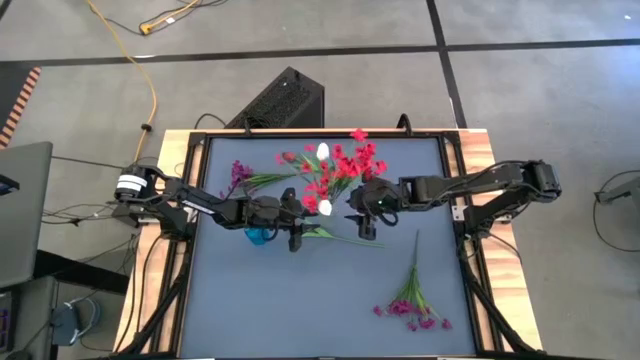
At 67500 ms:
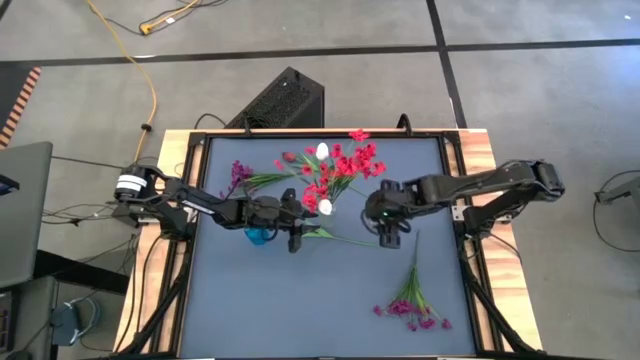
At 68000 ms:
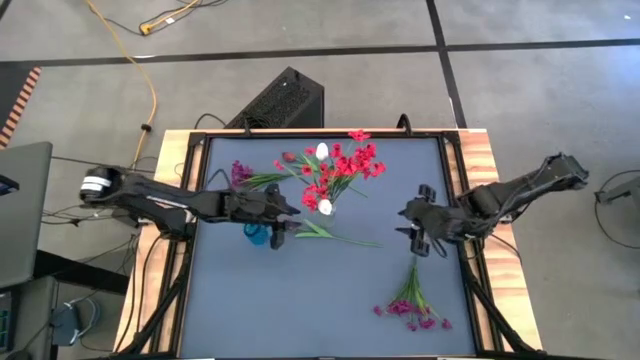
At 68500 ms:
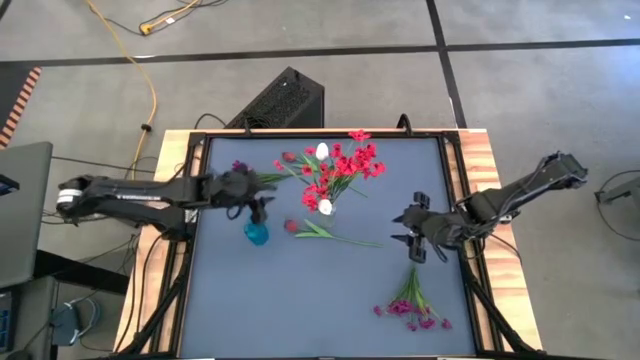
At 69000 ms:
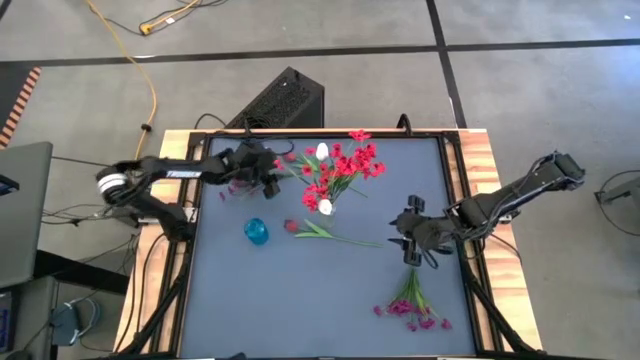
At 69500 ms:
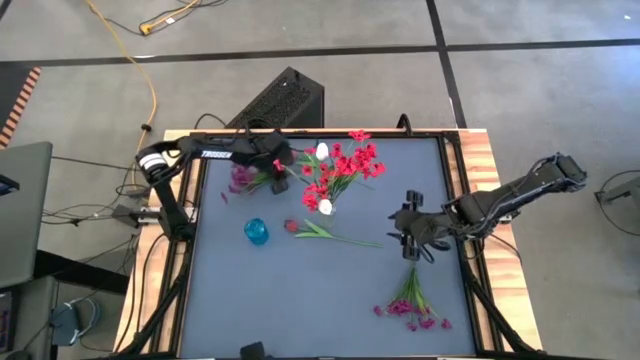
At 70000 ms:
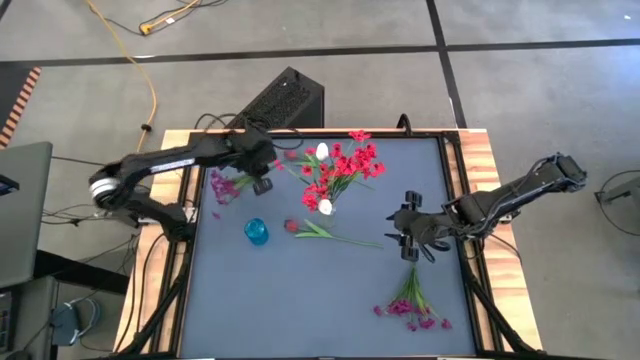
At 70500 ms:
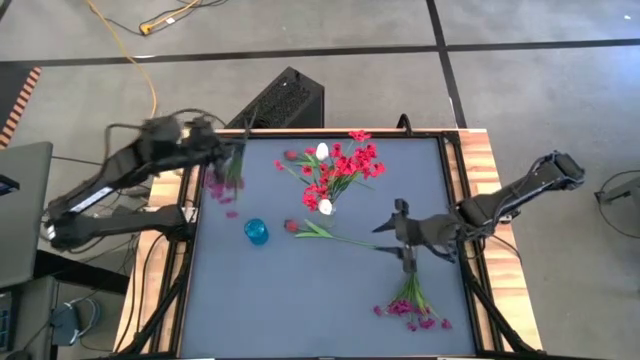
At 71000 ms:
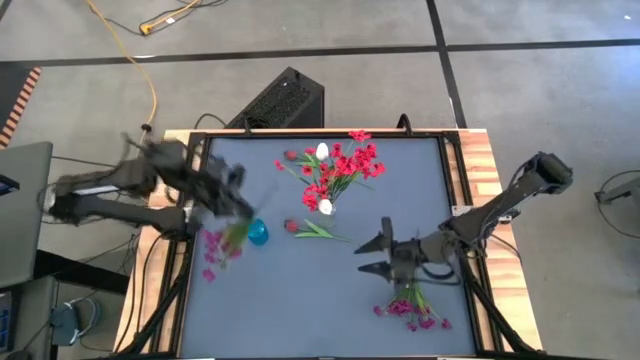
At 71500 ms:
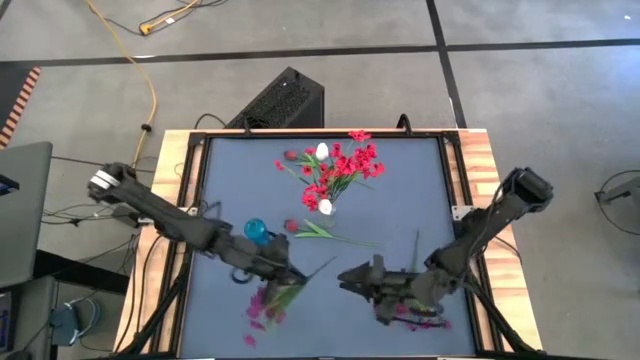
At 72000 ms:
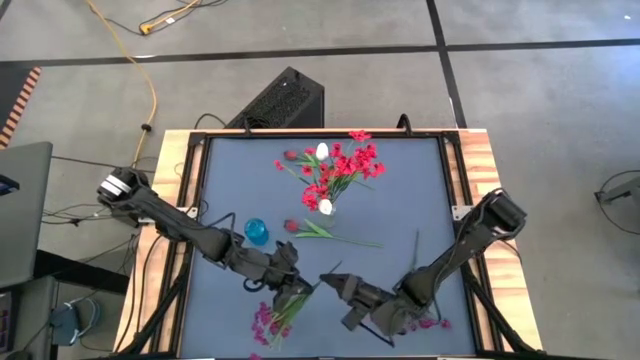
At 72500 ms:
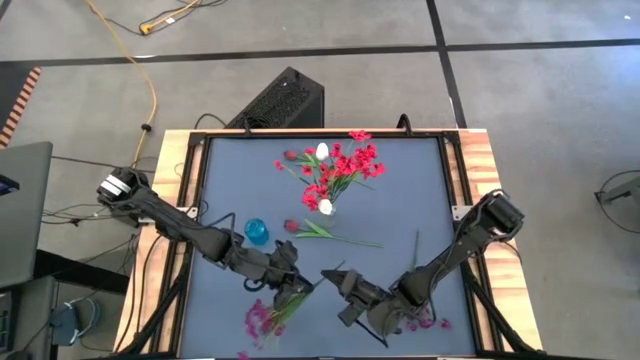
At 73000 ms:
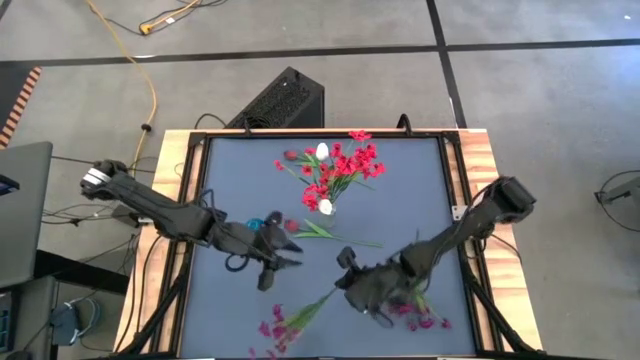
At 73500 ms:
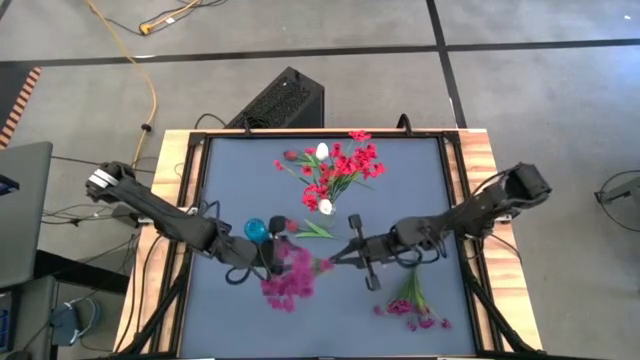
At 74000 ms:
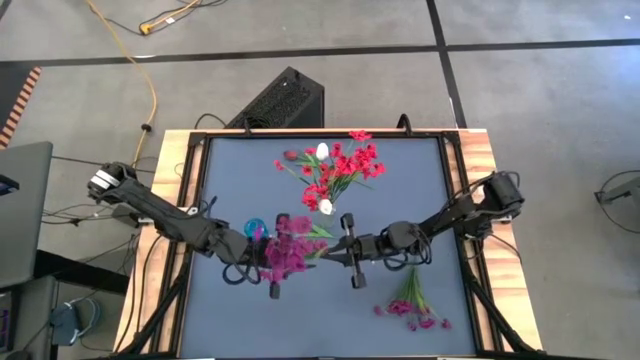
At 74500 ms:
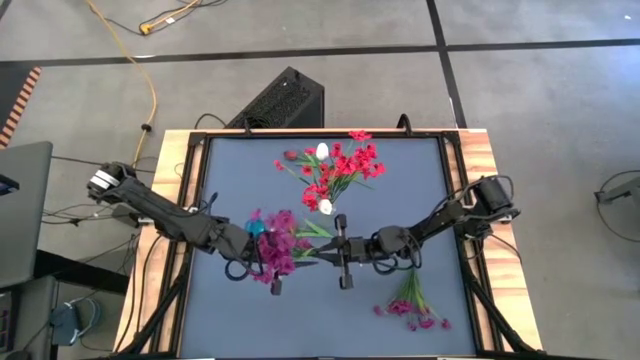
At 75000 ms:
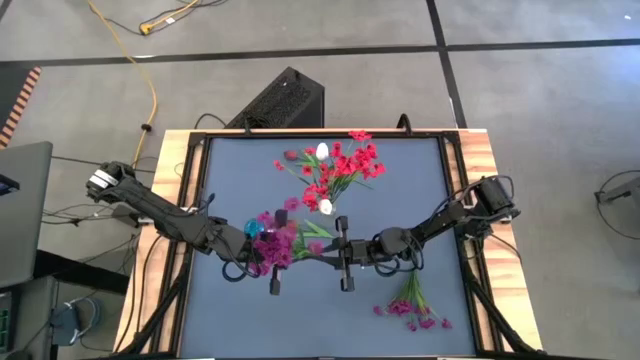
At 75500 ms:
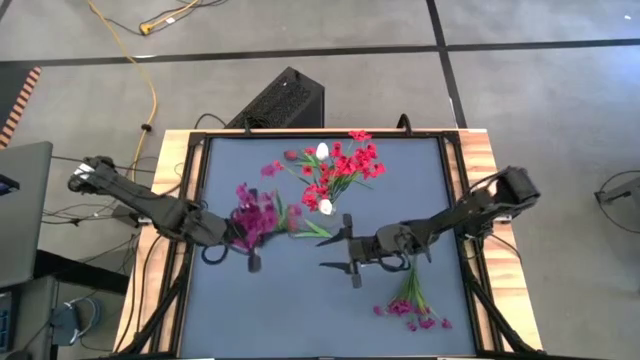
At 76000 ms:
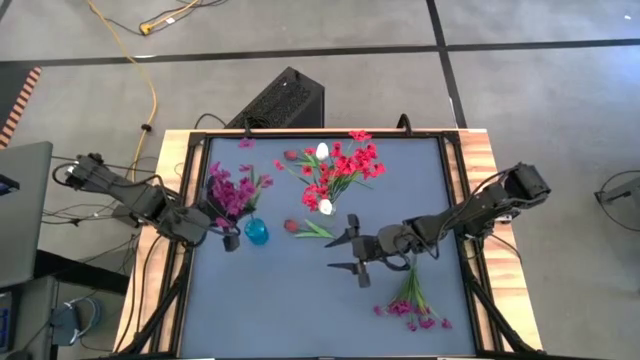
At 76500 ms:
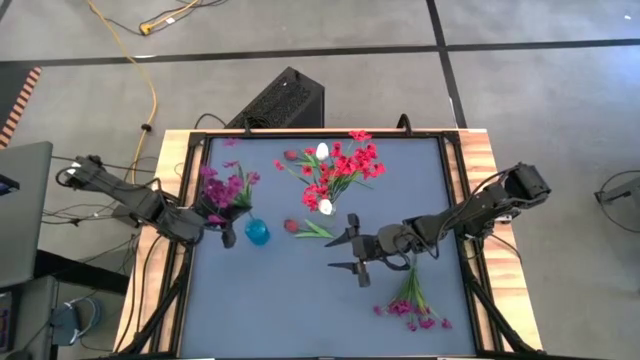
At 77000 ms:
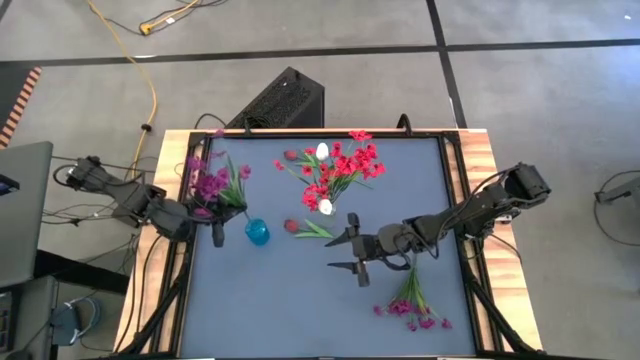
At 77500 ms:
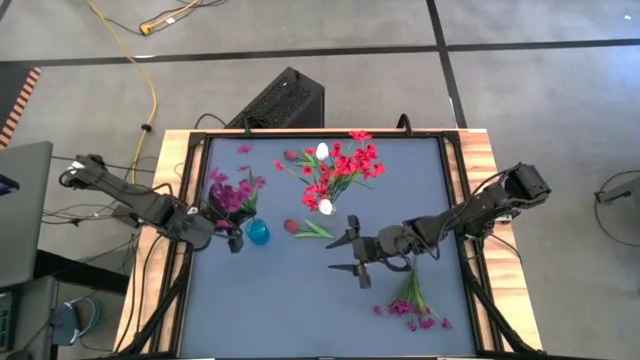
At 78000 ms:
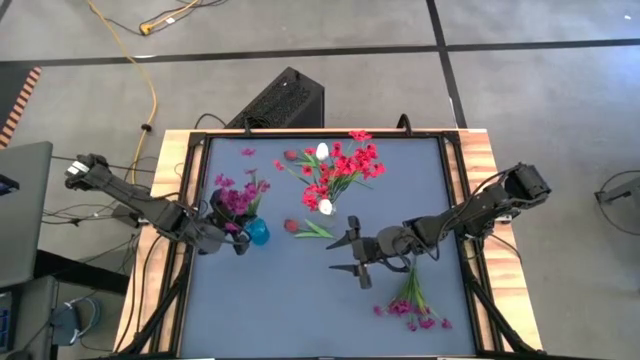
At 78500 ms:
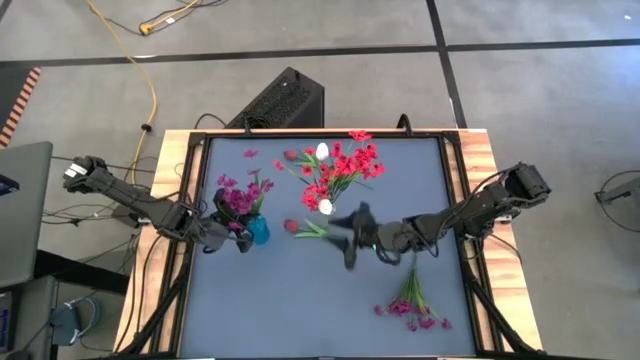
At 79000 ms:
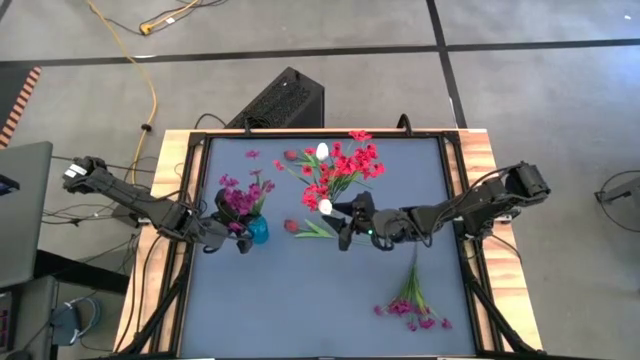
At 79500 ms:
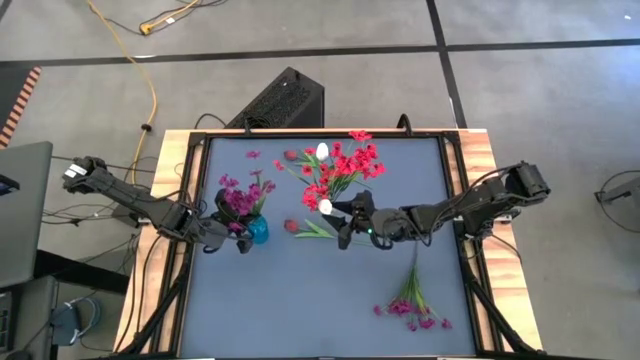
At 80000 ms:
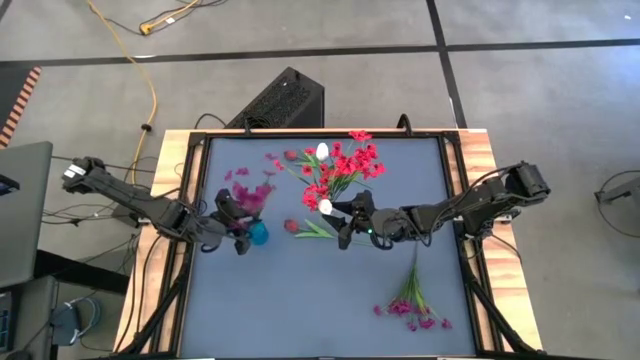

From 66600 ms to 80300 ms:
Task: Sort flowers into vase by color
Put the top violet flowers into the blue vase

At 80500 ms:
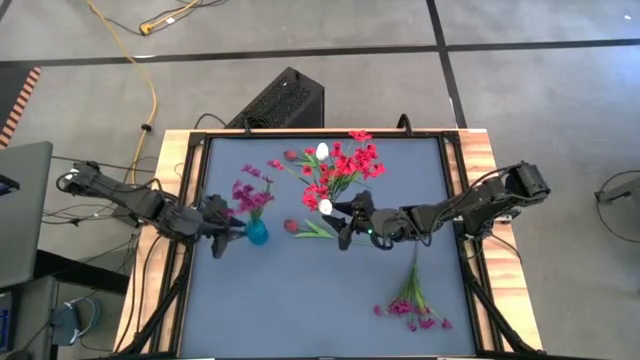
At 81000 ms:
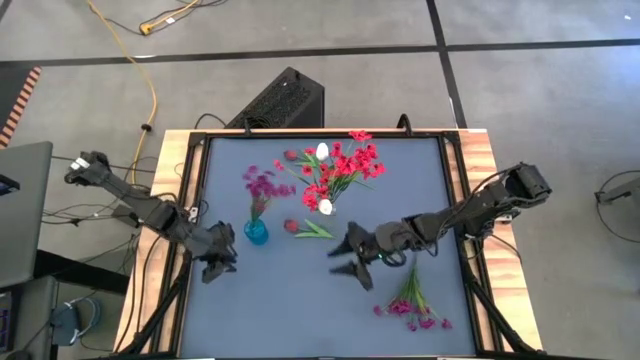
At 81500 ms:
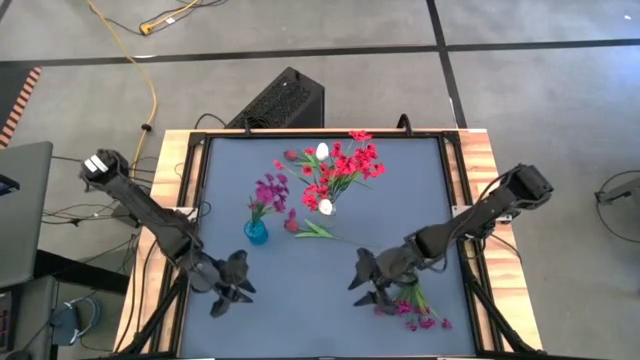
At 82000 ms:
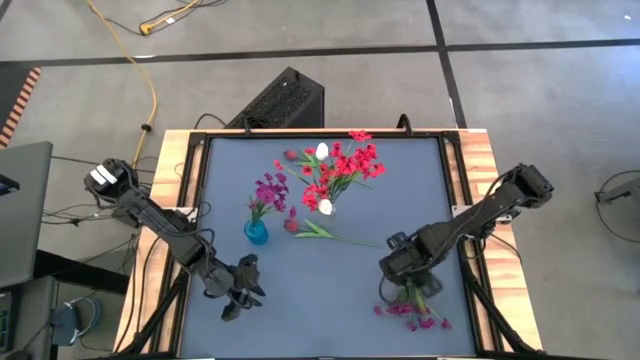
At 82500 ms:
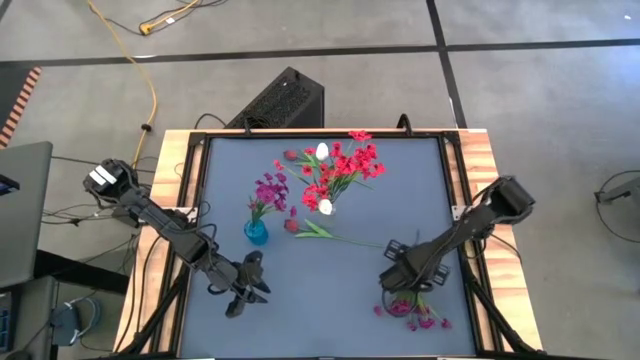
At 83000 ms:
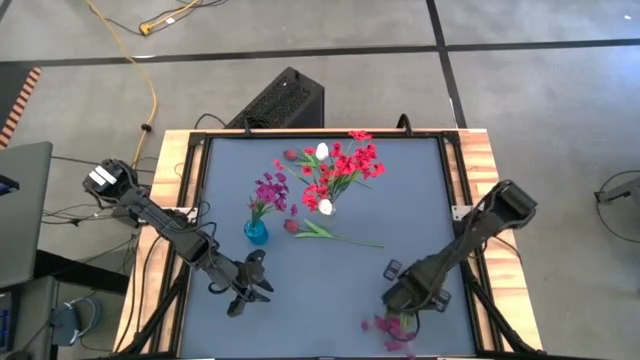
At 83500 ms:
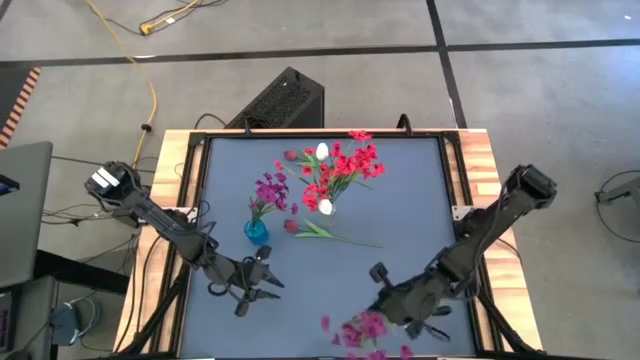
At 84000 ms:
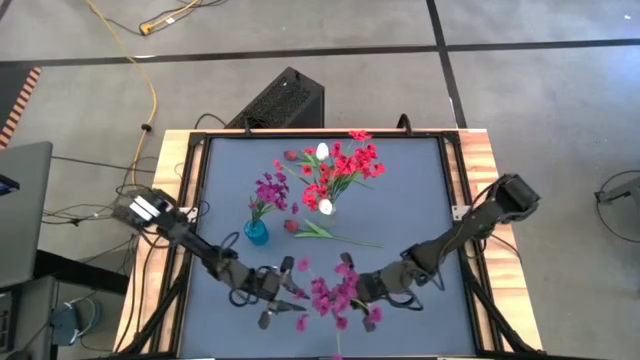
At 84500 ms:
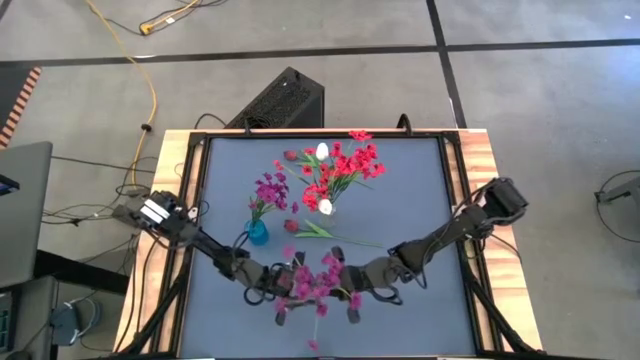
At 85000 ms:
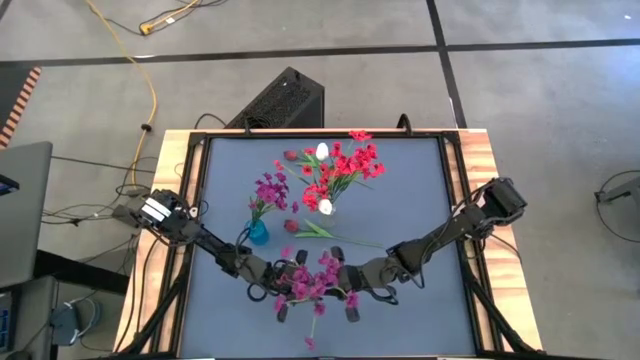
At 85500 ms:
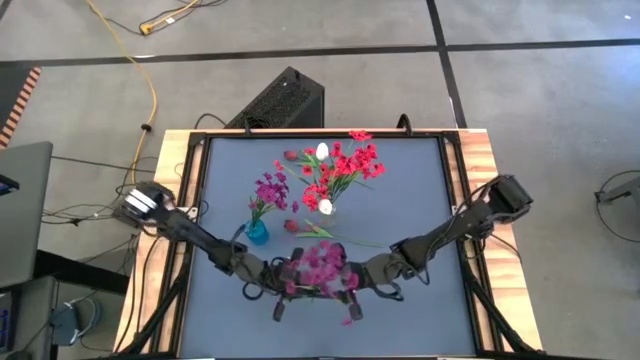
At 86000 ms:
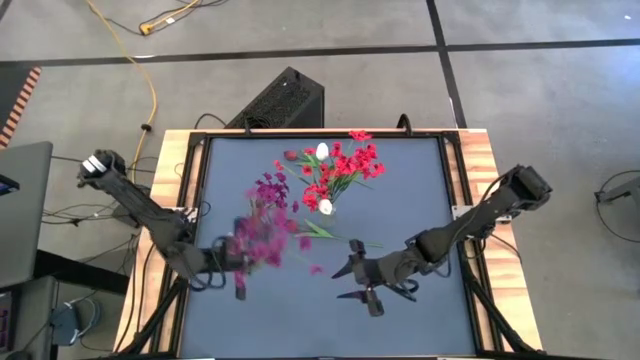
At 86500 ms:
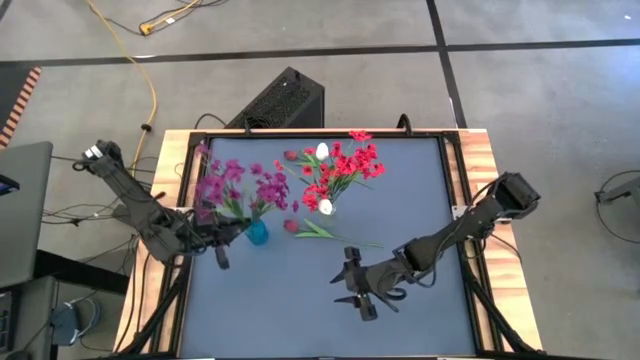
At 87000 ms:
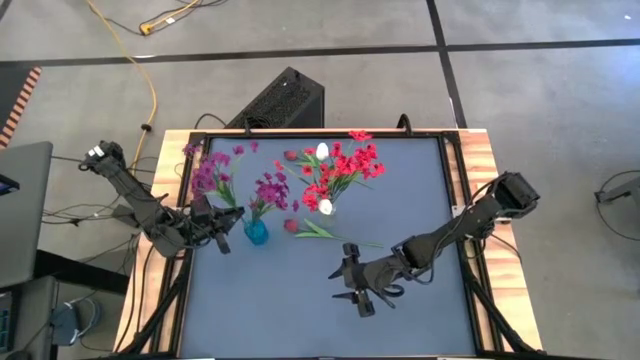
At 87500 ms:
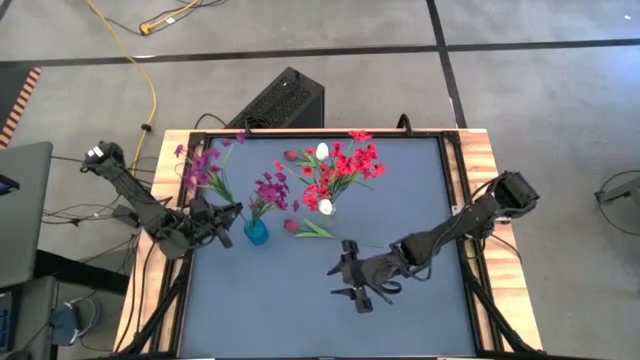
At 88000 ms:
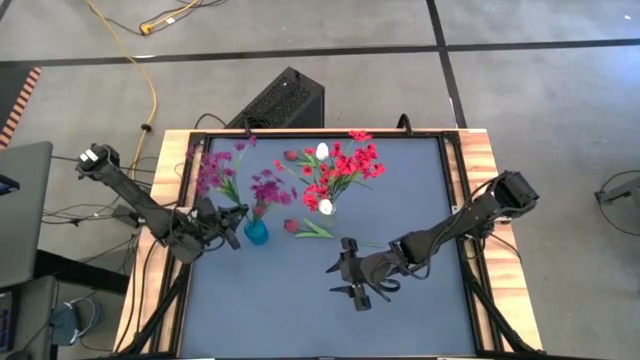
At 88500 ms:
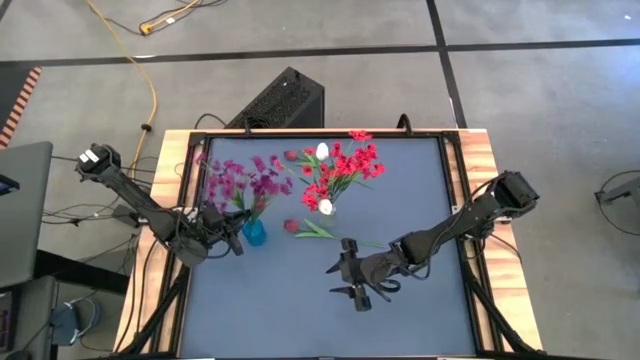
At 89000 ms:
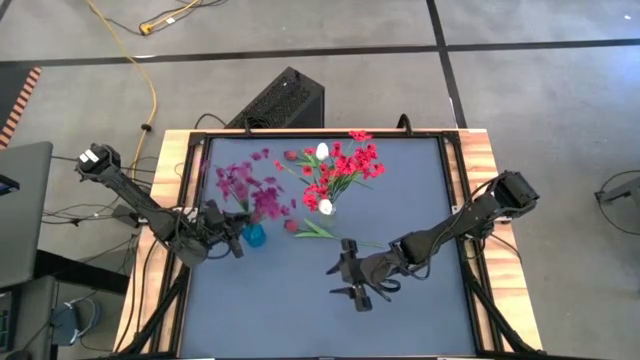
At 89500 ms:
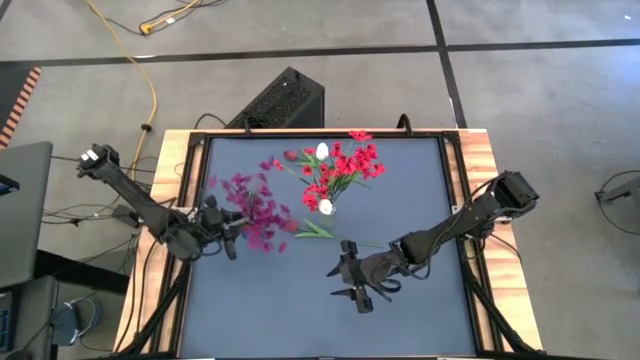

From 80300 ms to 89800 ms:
Put the violet flowers into the blue vase
